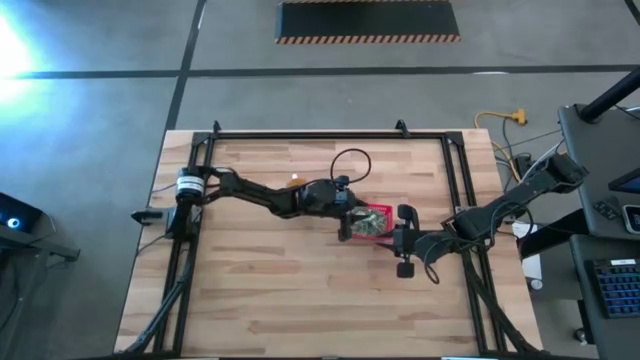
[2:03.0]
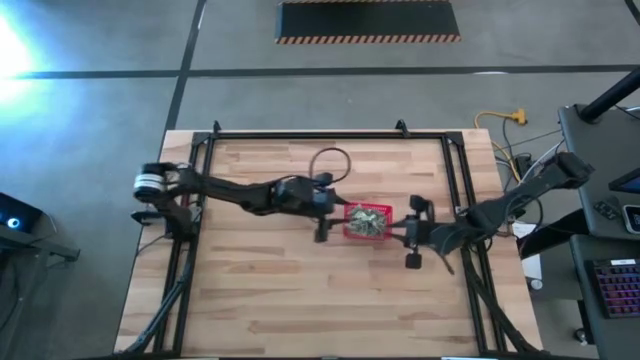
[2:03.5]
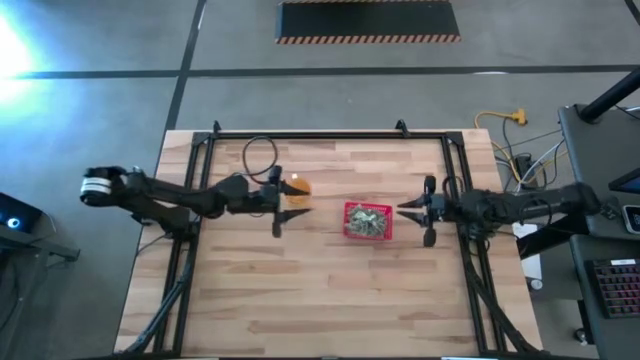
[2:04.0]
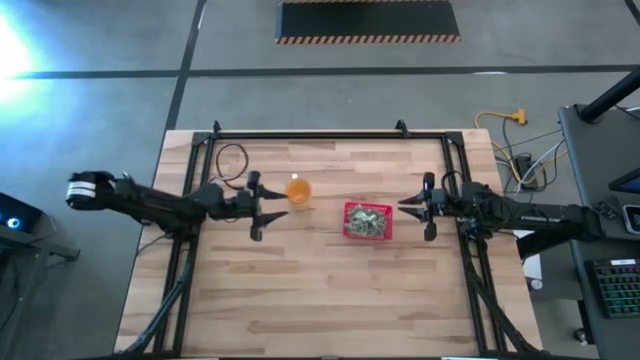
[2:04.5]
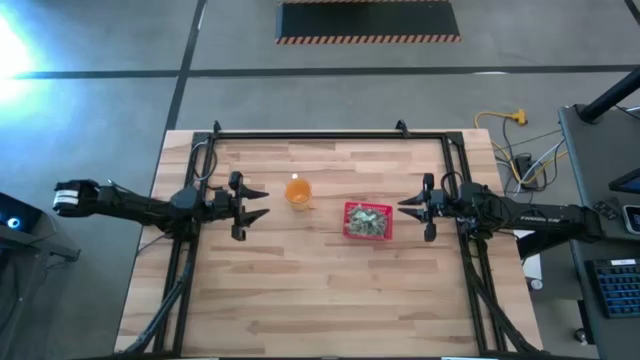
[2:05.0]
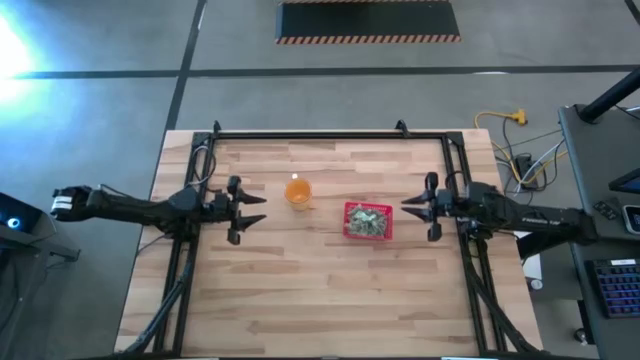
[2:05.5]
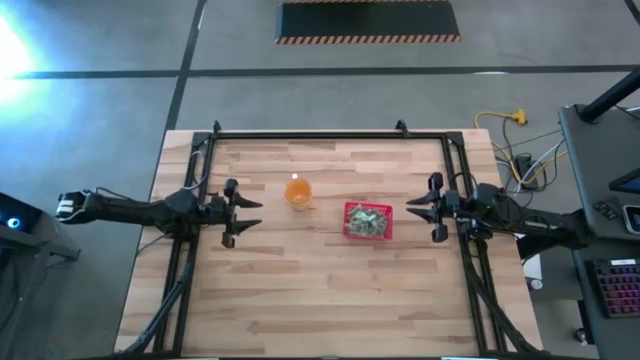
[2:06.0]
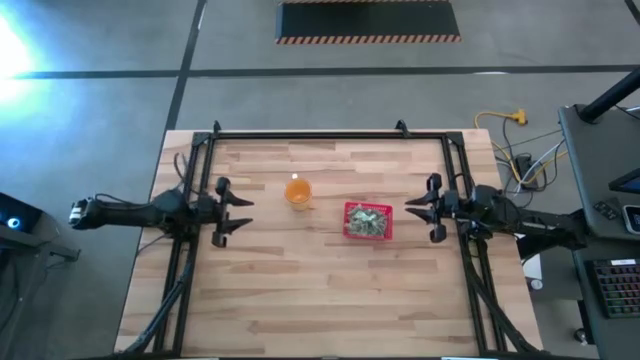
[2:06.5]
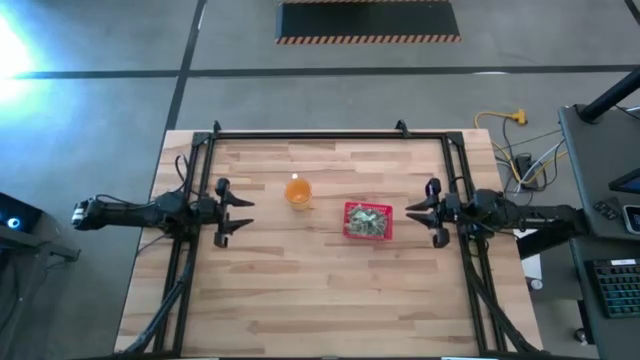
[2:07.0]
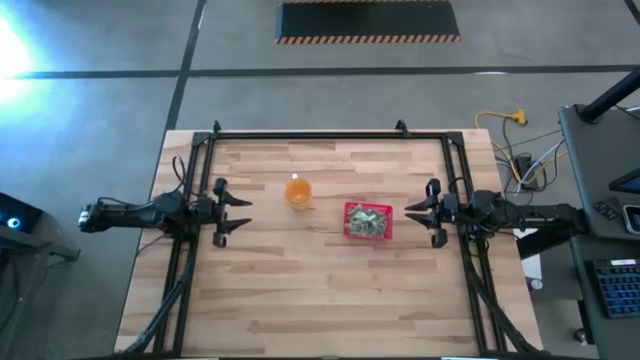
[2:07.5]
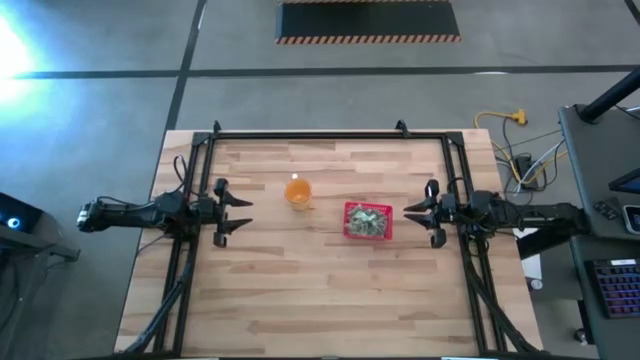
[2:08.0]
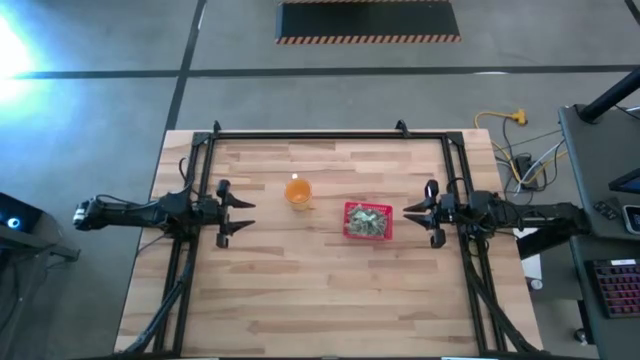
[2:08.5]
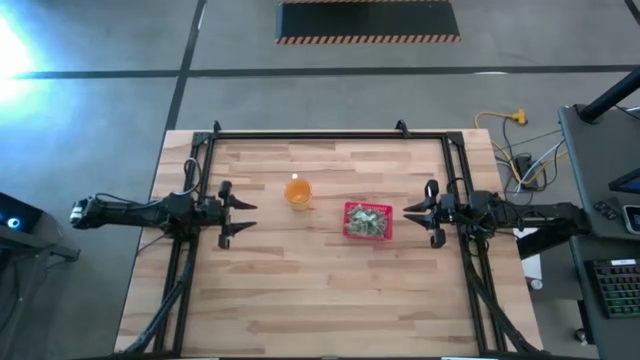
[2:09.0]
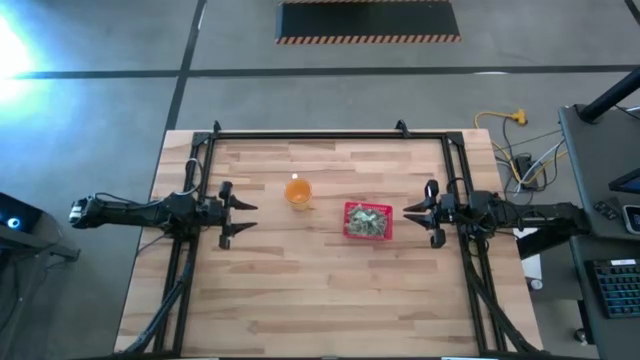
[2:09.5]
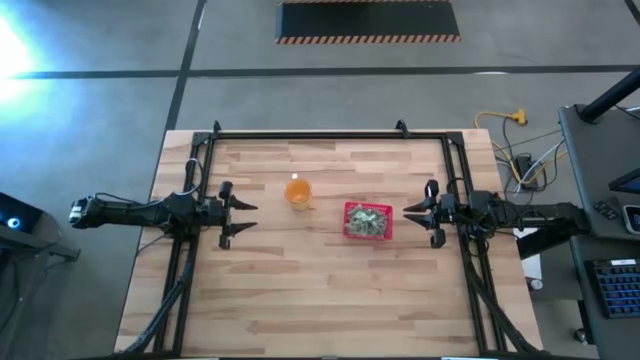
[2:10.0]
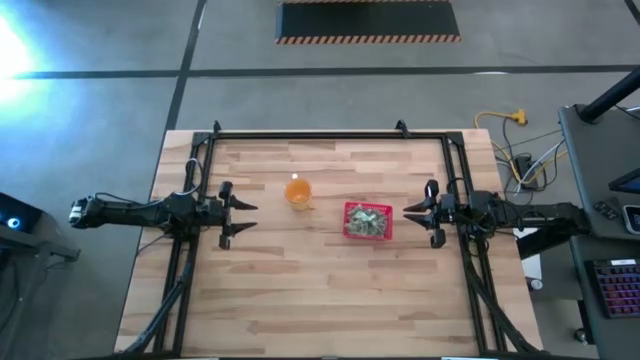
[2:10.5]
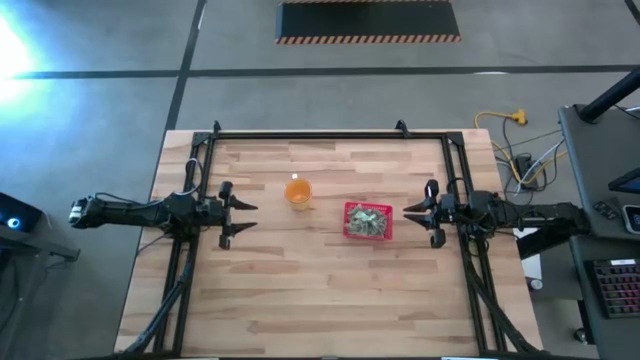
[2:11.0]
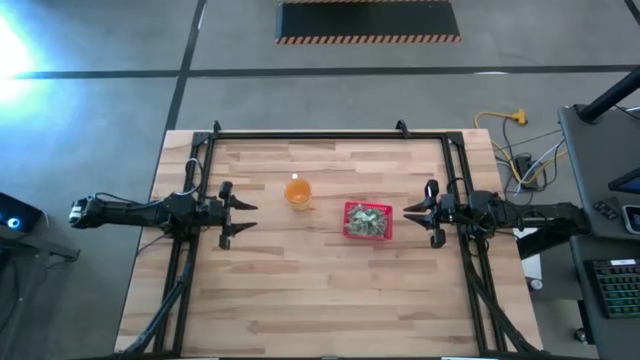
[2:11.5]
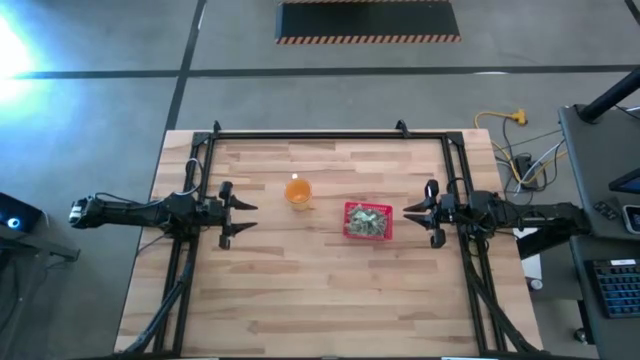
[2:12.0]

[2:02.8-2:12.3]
Task: Pick and place Stevia / Truvia into bins
Return to Home Position

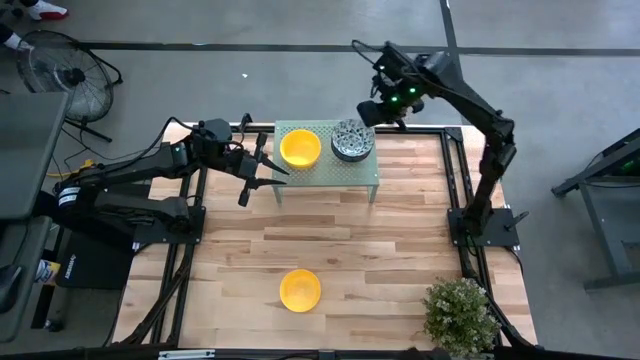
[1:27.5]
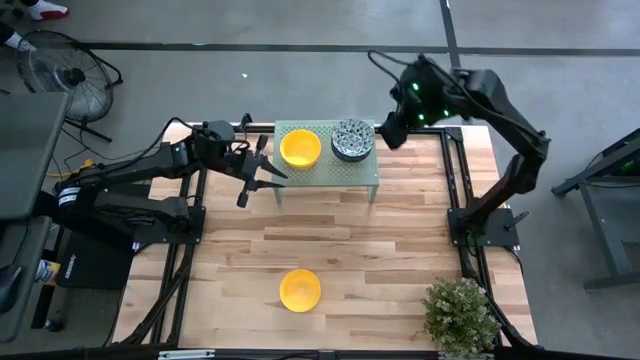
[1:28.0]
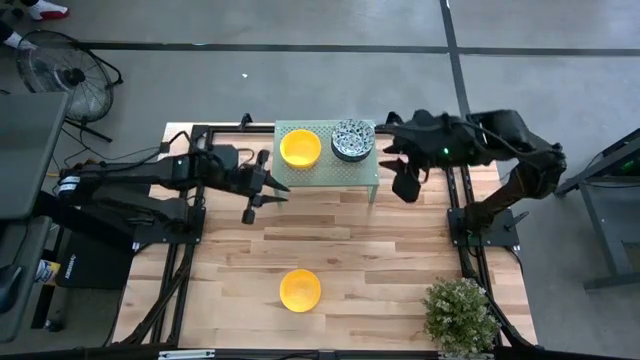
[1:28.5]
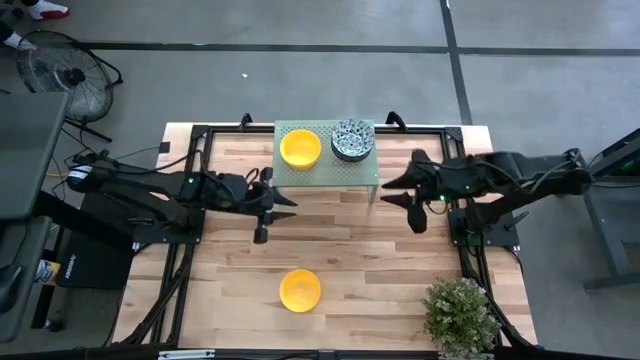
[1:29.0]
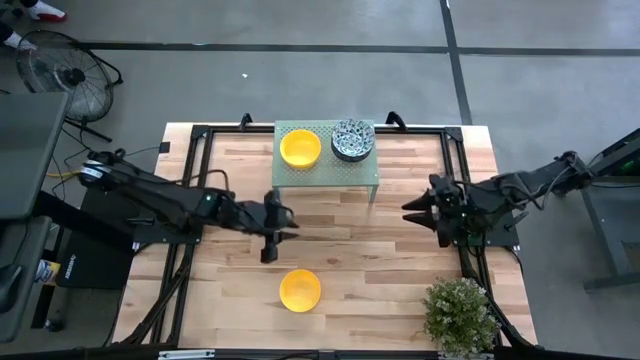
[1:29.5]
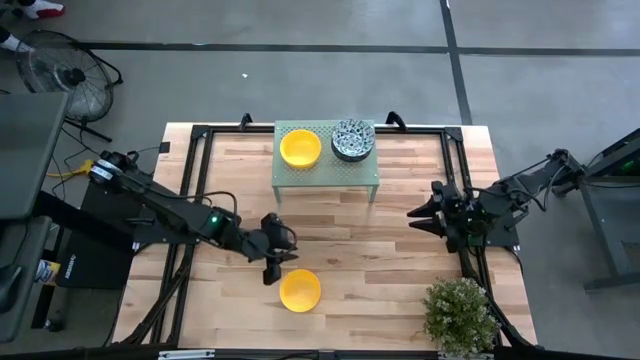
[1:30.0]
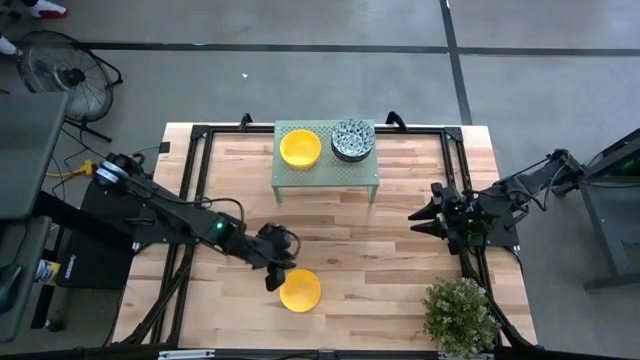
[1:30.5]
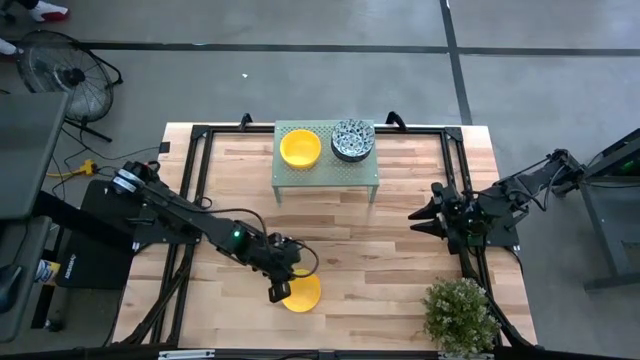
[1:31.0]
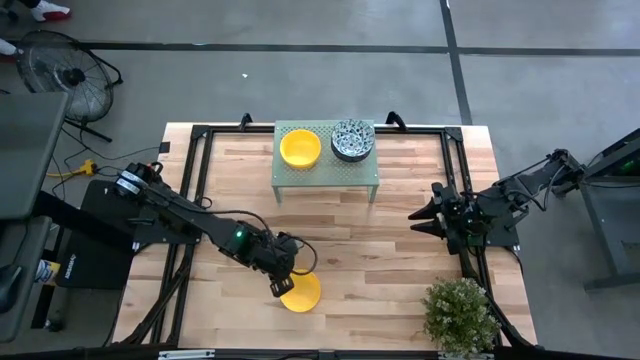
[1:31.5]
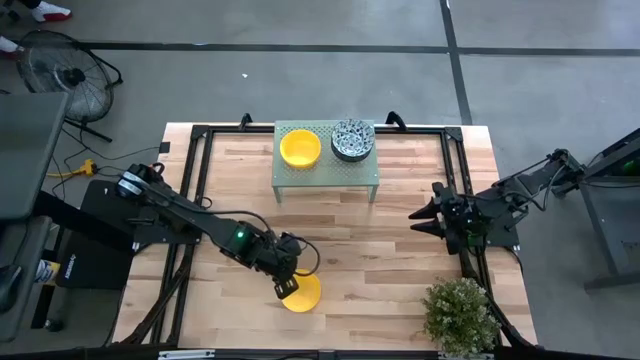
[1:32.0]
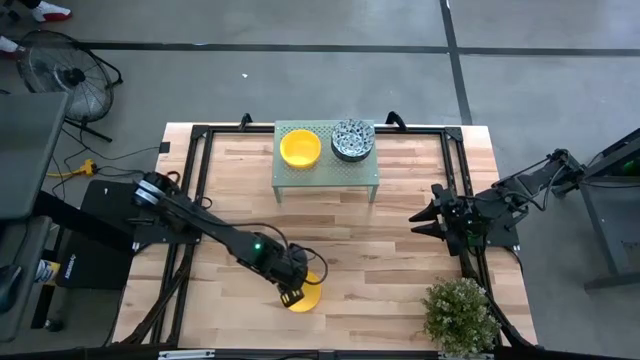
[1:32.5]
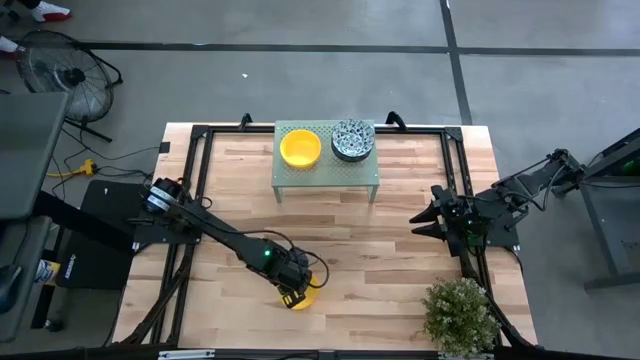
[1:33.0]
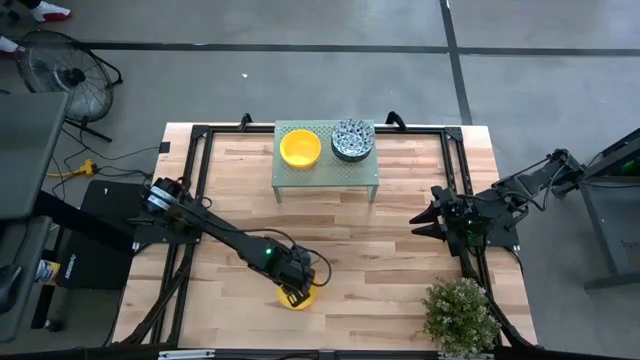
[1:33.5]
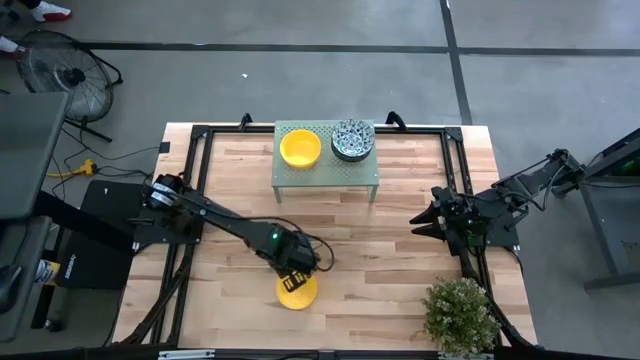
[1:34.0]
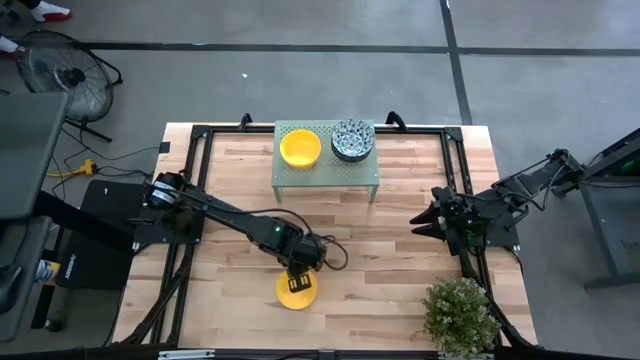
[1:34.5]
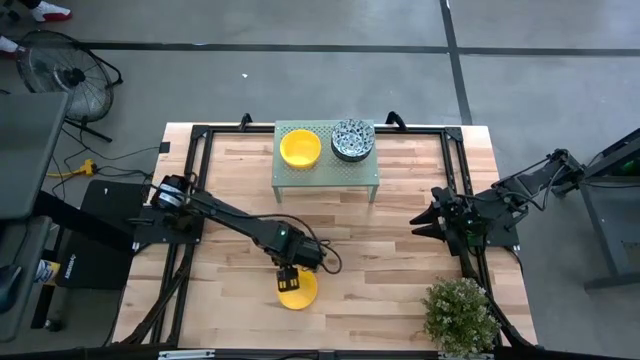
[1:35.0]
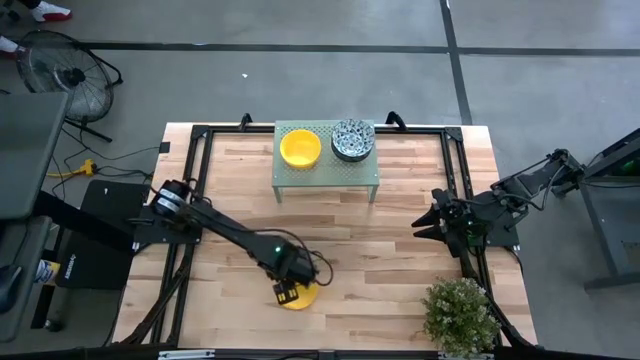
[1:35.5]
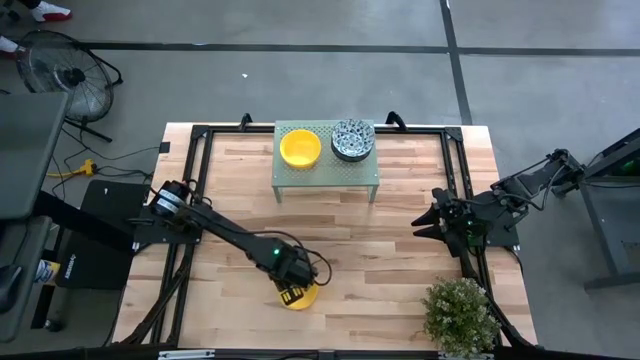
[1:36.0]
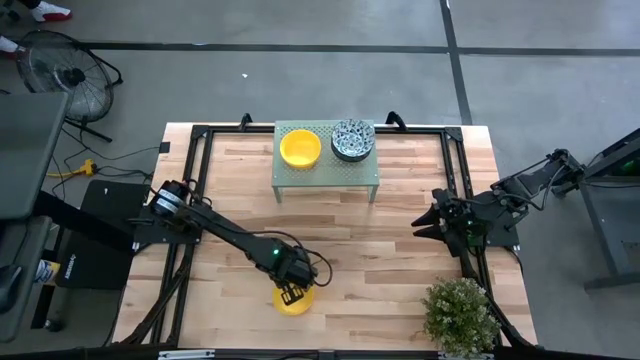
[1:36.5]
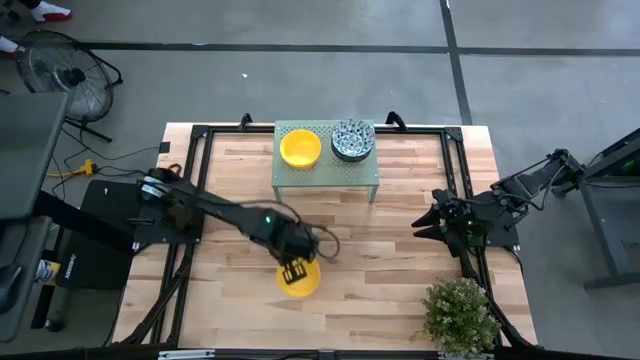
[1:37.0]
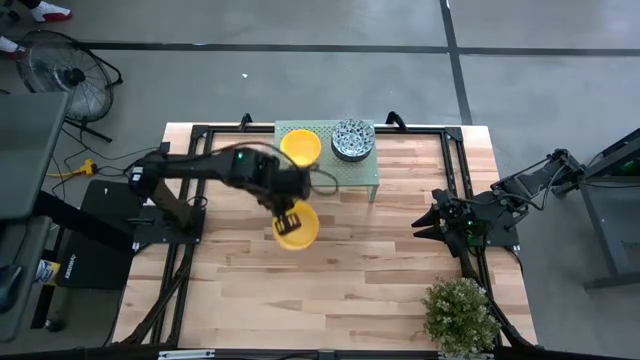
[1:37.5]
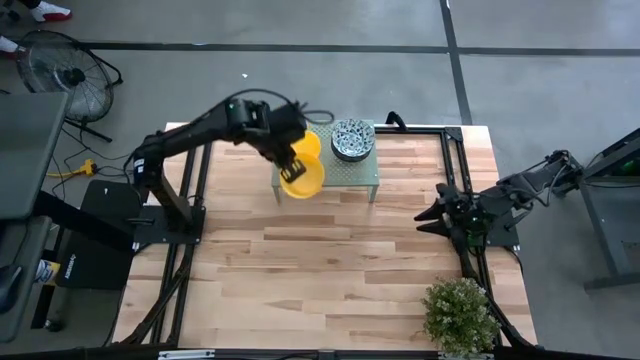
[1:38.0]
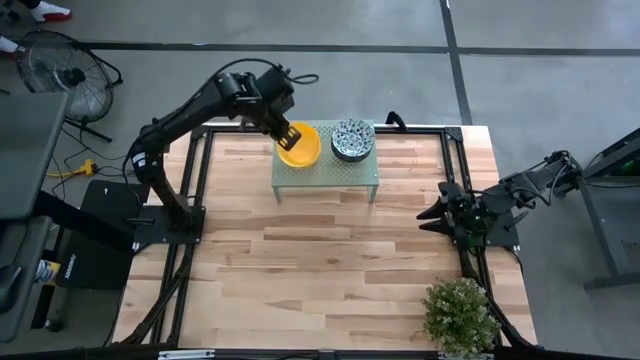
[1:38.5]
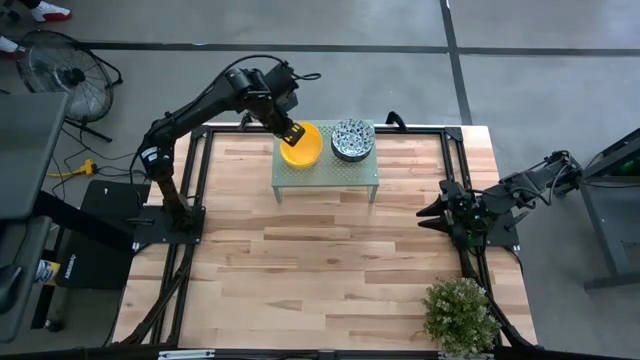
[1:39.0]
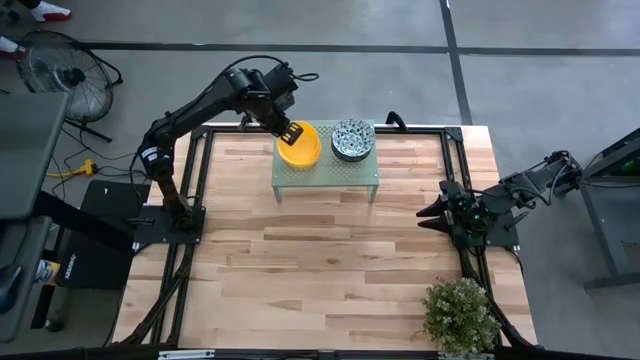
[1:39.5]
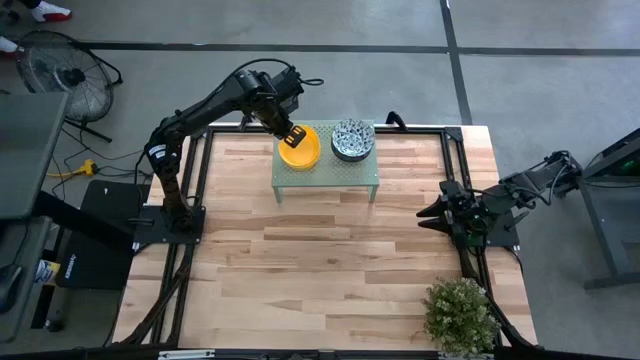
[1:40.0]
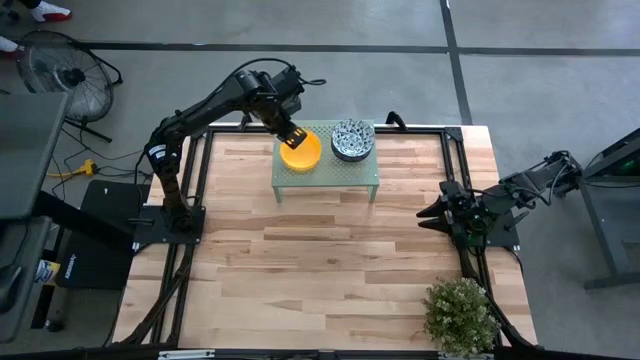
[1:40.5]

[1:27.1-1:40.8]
Task: Pick & Place Mini bowls
Stack the yellow bowl on the stacked yellow bowls on the shelf
